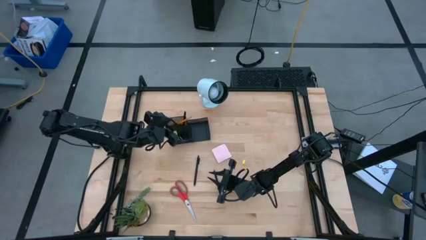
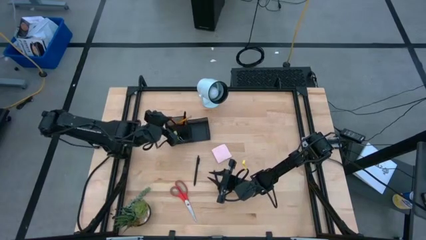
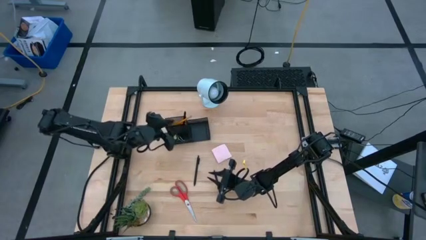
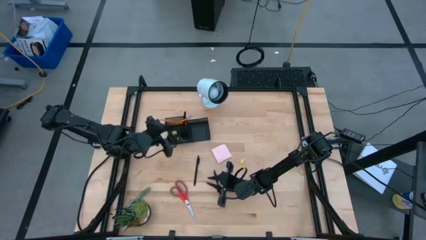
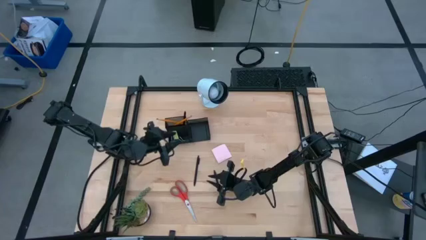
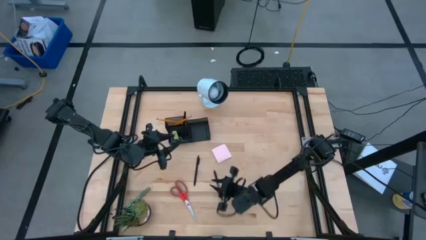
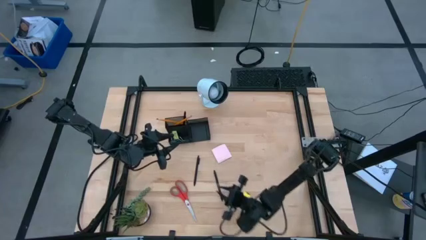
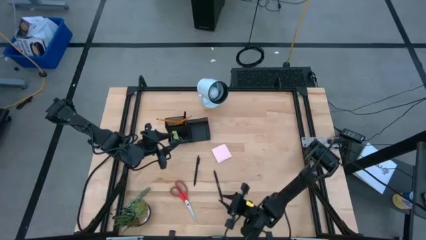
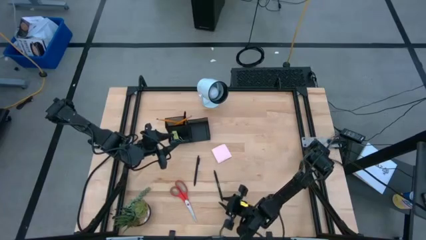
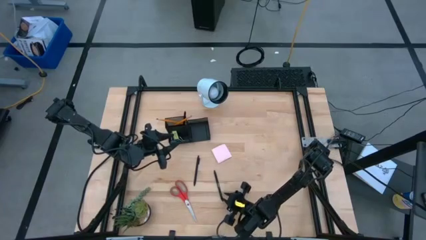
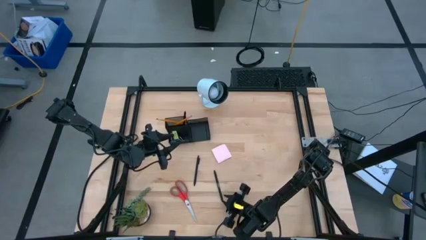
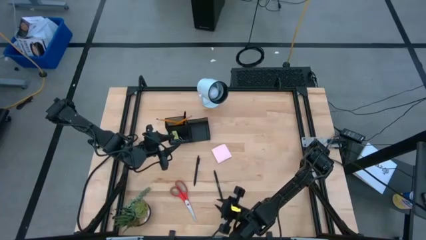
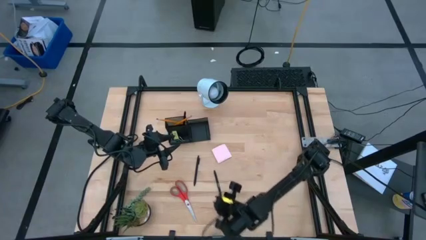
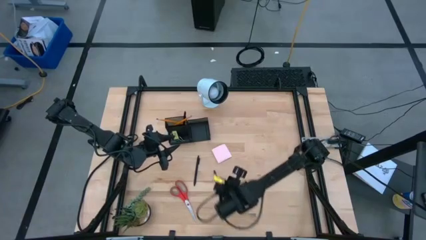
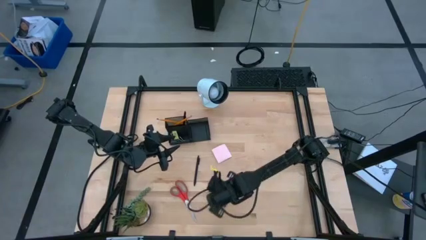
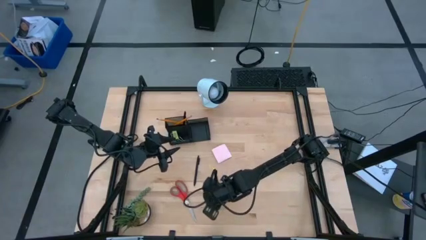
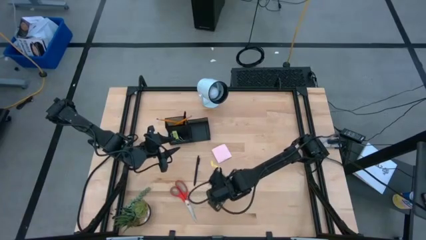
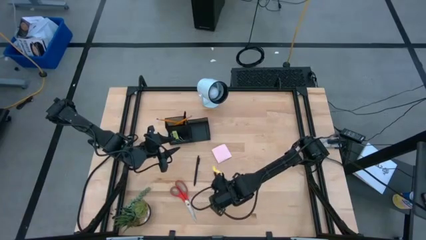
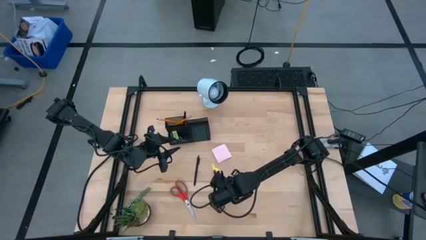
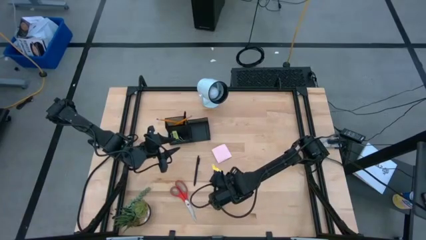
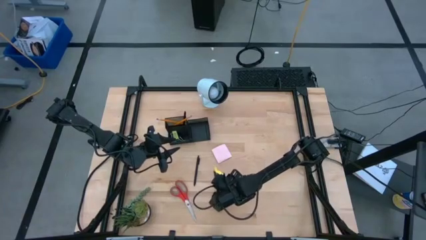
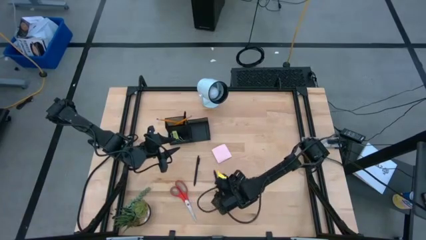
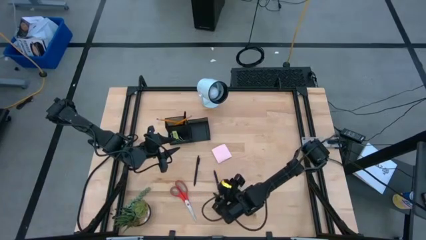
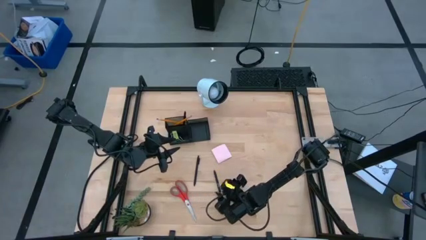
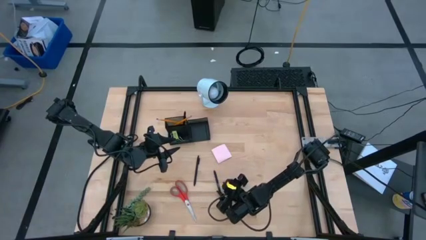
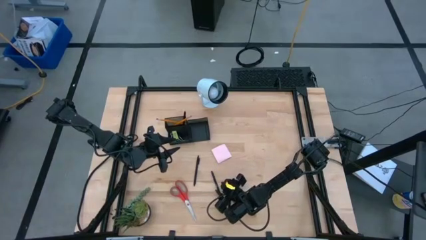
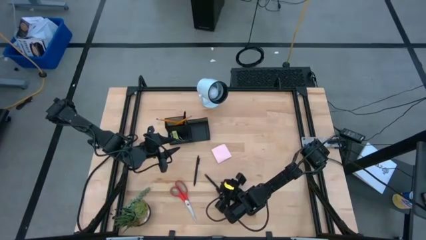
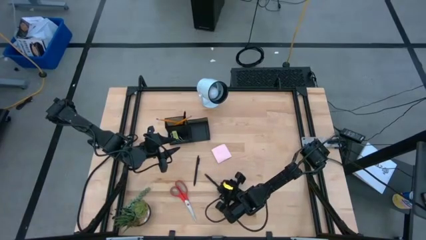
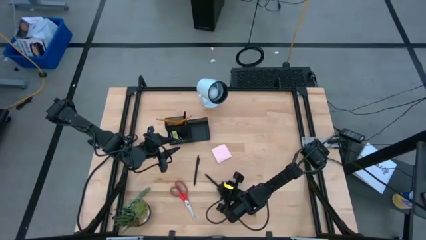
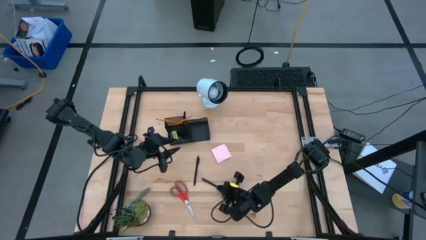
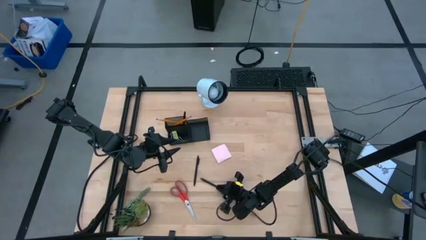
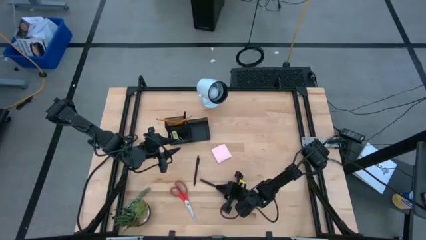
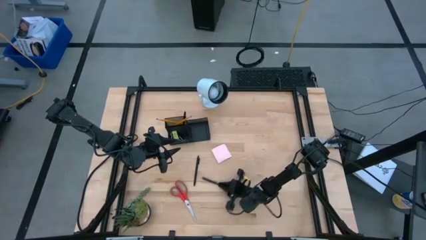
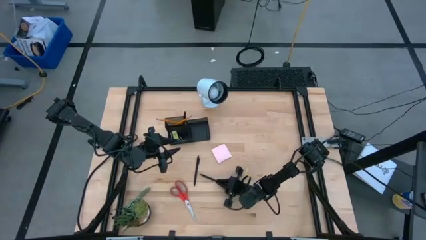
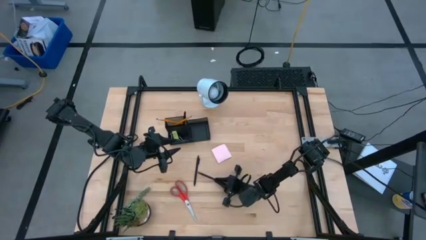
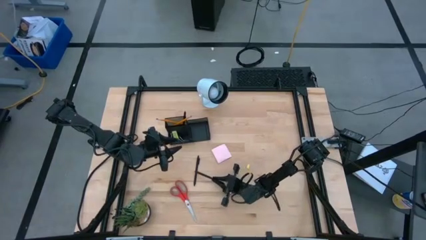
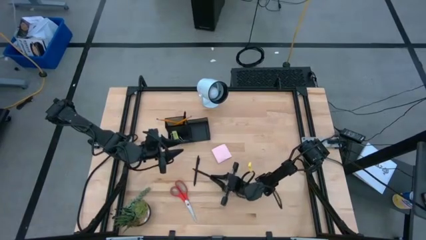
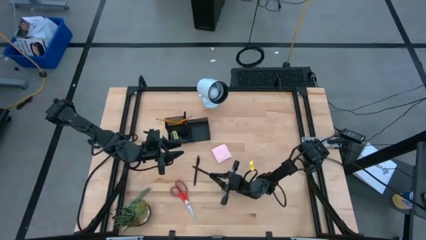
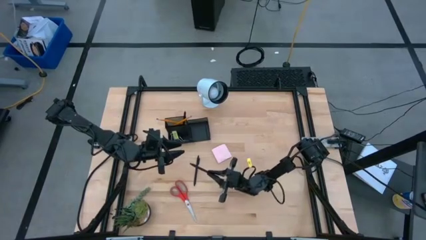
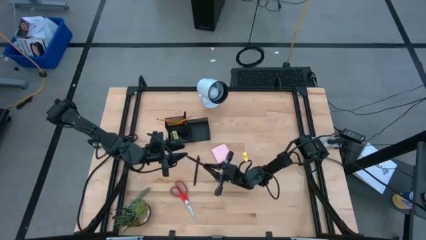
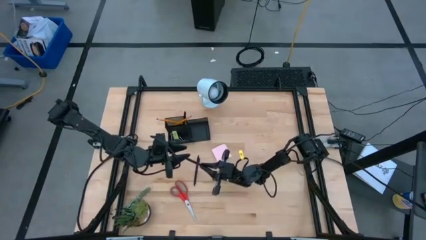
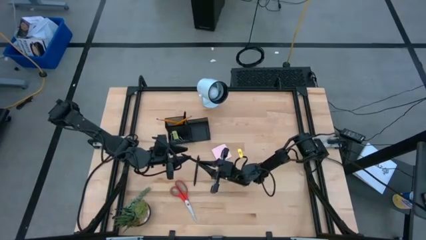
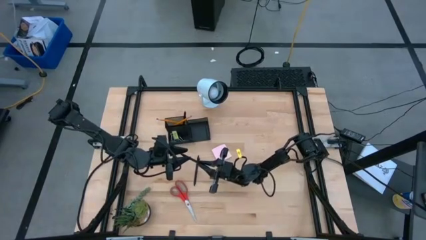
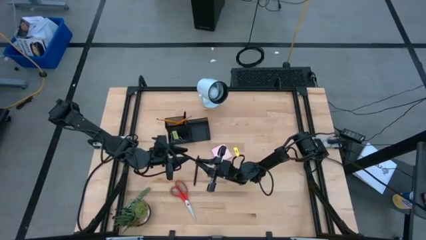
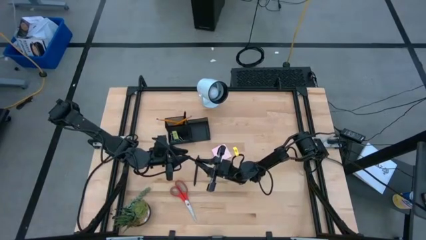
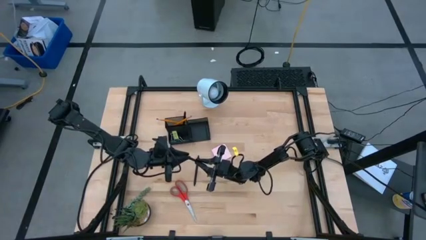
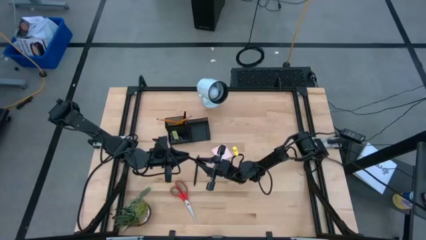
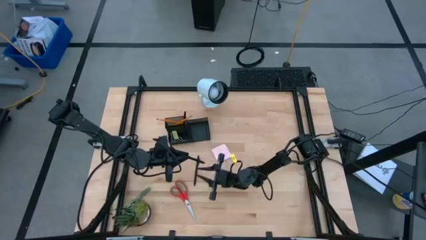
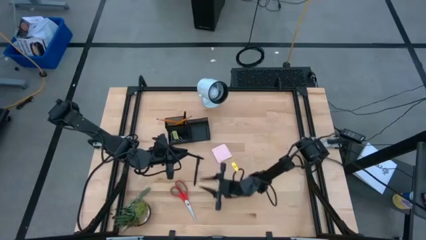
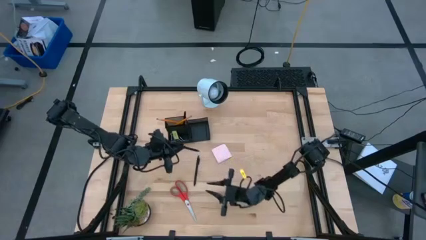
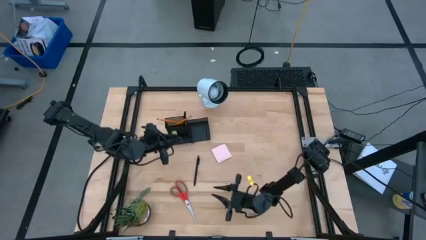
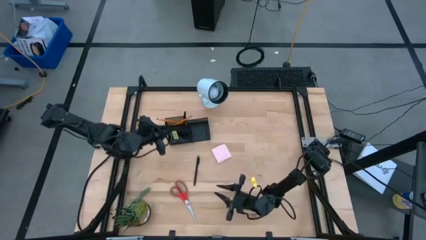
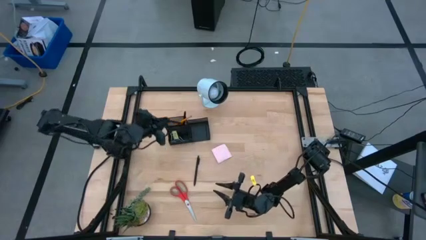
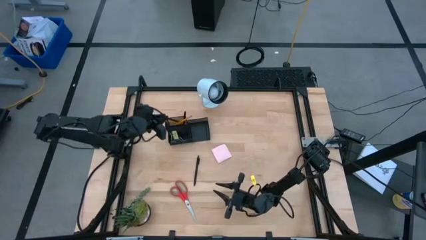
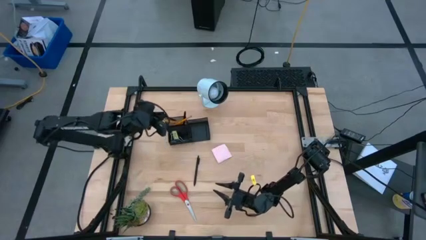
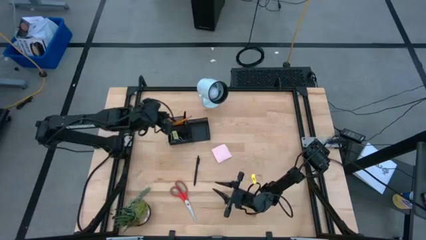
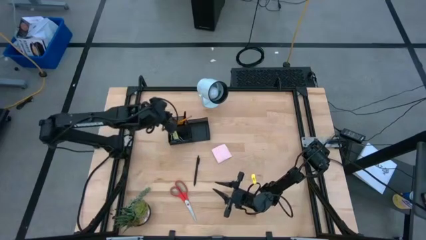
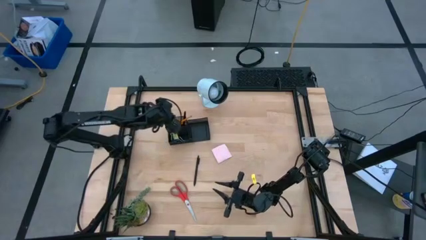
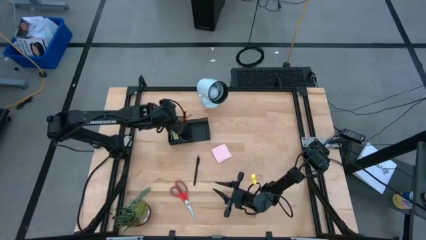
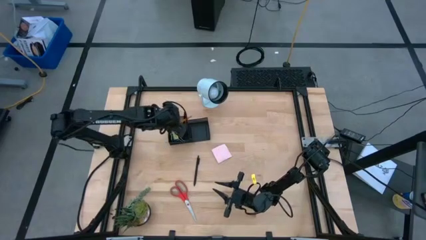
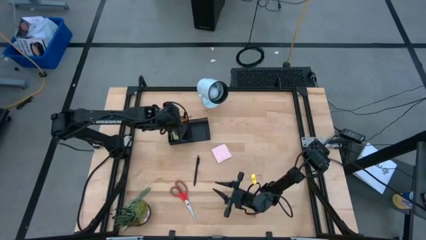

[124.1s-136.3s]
Task: Pick and place office supplies into organizer
Put the black pen into the black desk organizer

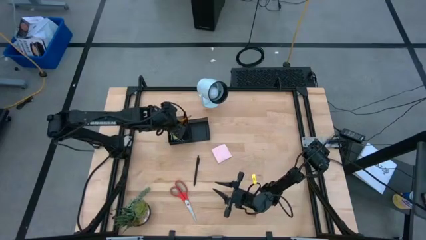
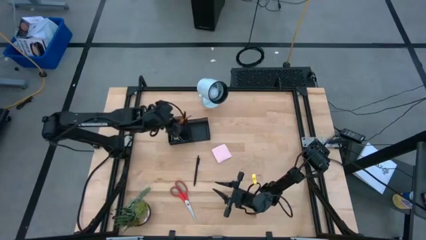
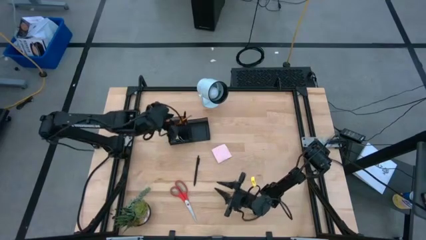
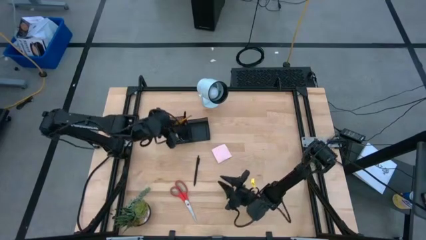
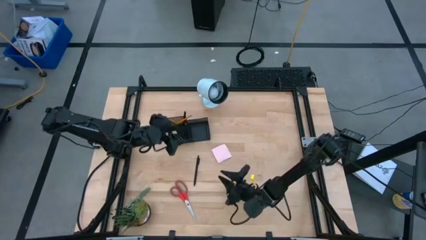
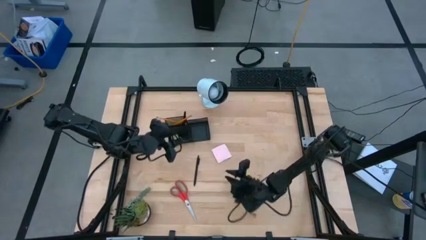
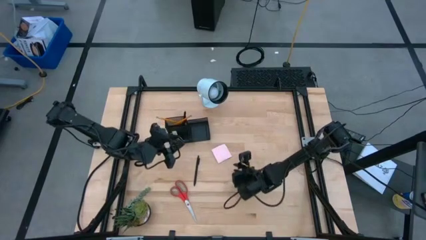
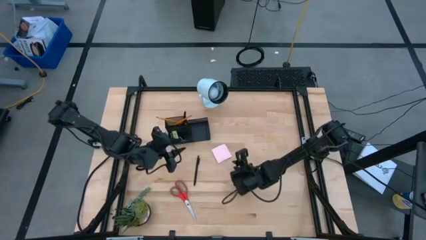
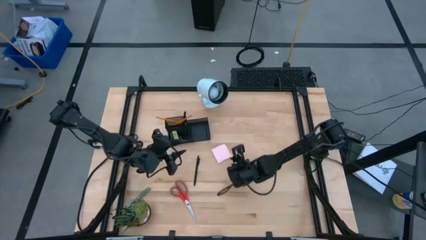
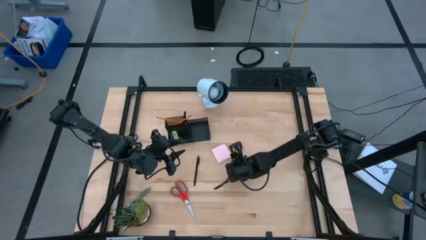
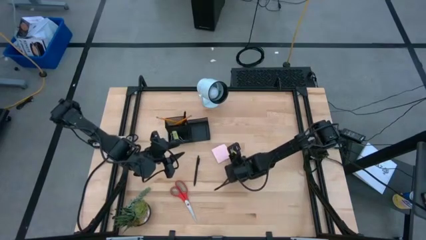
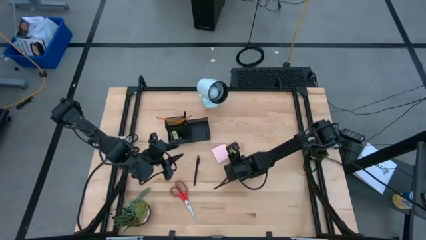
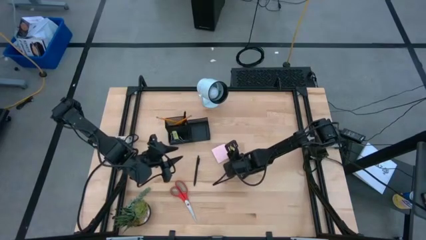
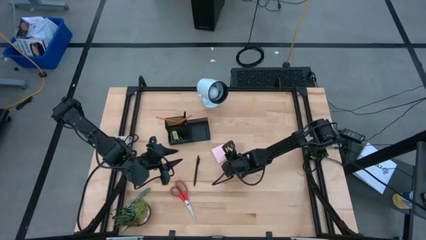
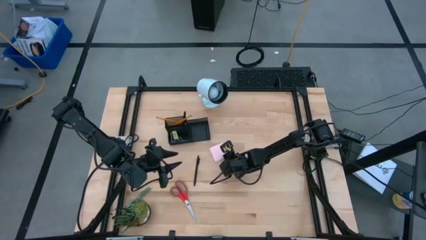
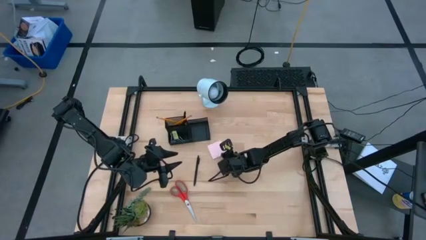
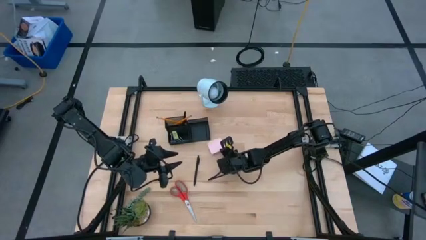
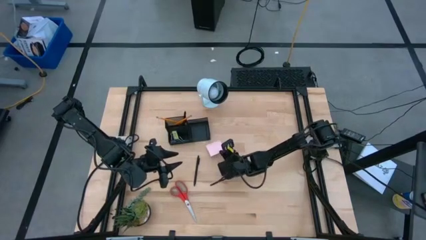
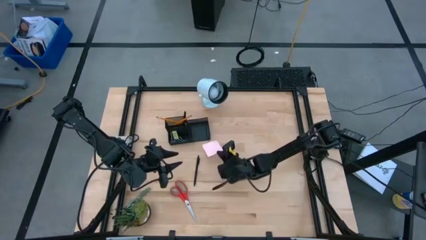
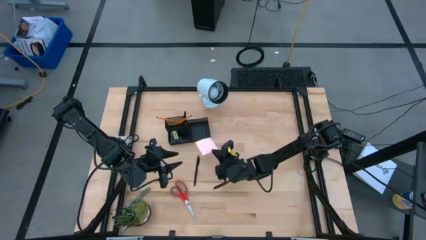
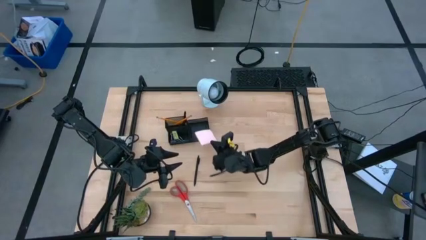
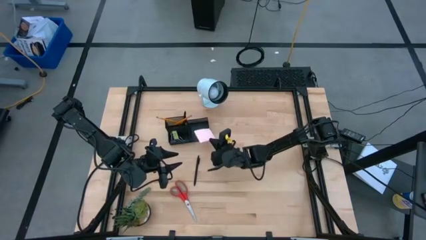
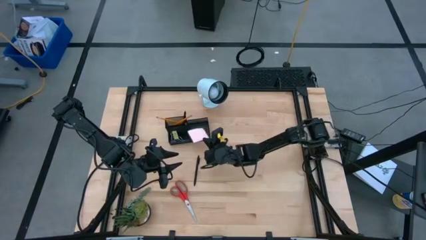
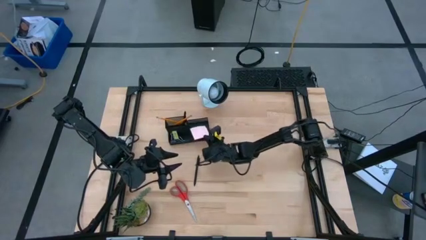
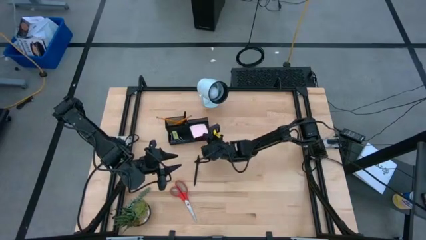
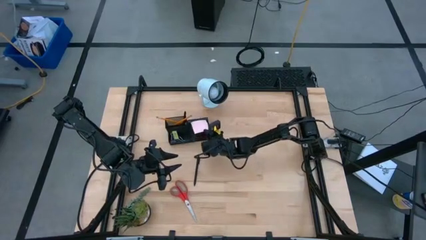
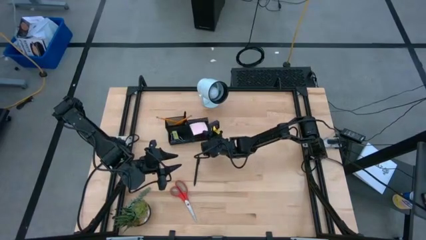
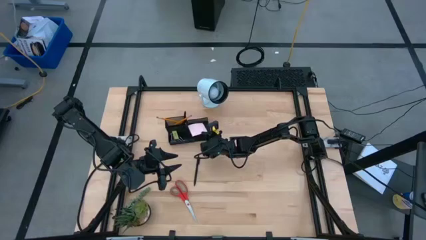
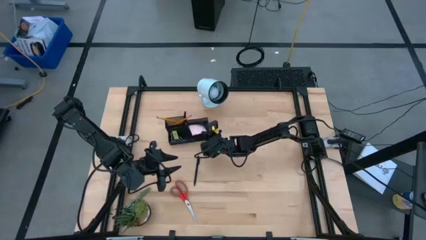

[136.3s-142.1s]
Put the pink sticky note pad into the black desk organizer
